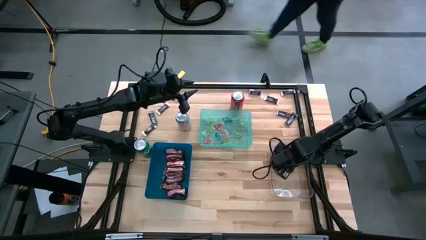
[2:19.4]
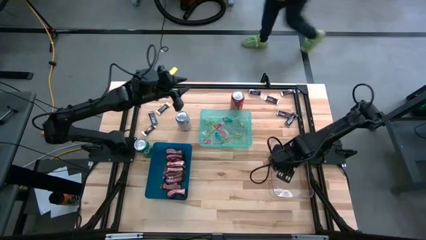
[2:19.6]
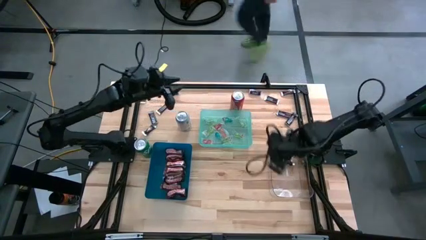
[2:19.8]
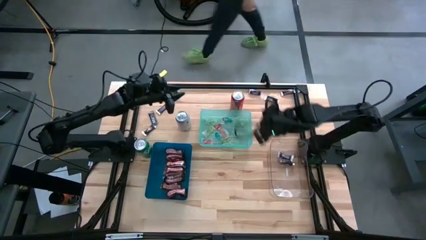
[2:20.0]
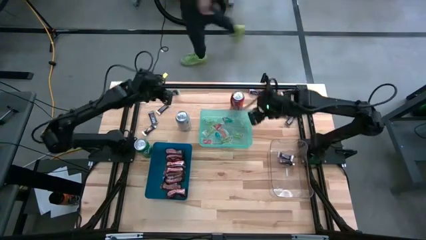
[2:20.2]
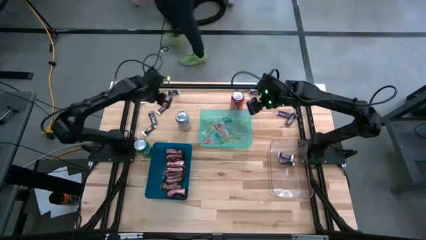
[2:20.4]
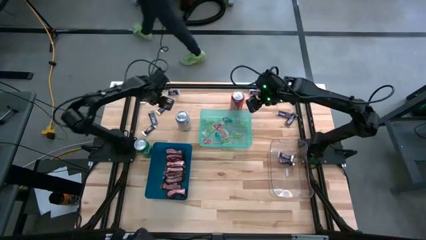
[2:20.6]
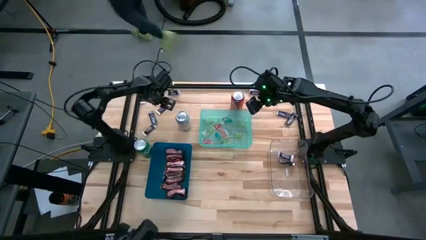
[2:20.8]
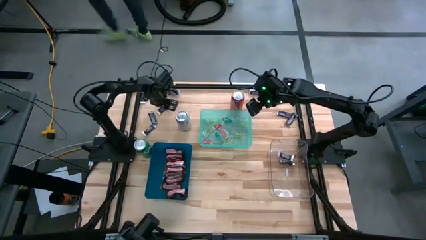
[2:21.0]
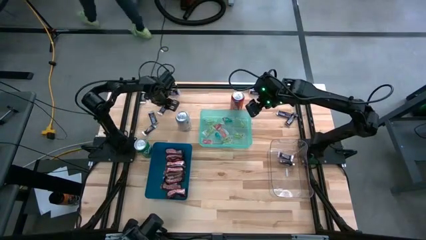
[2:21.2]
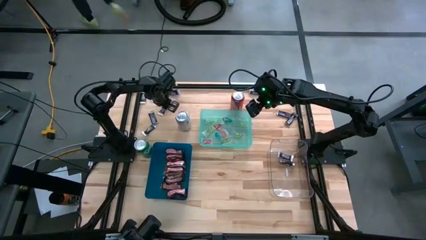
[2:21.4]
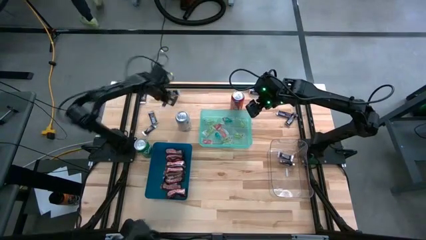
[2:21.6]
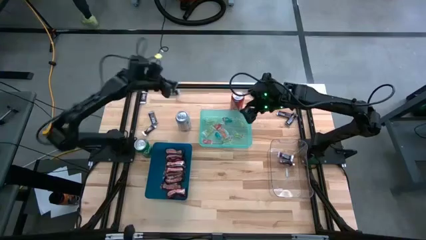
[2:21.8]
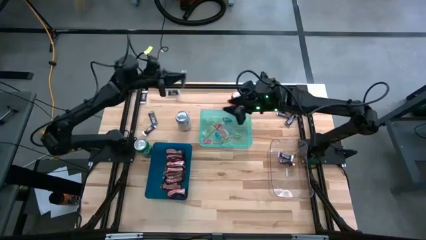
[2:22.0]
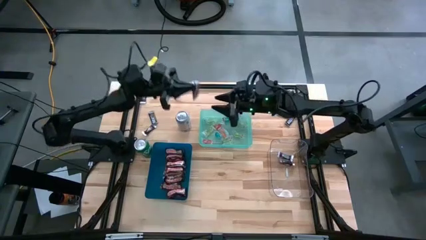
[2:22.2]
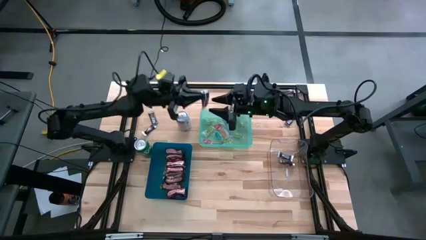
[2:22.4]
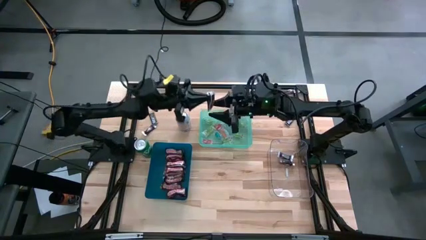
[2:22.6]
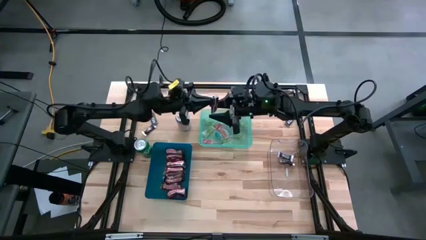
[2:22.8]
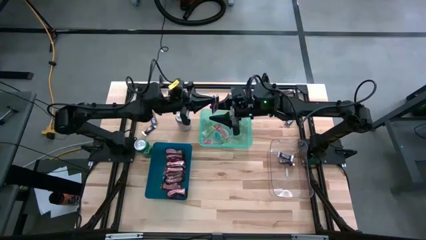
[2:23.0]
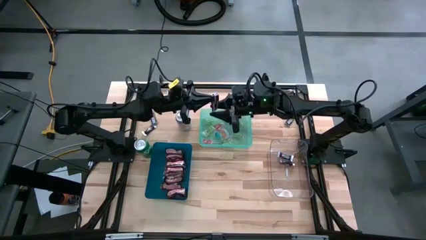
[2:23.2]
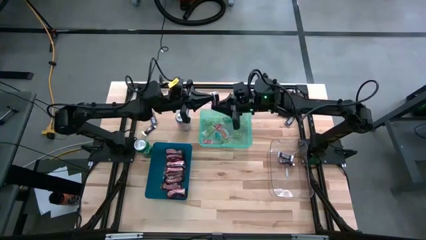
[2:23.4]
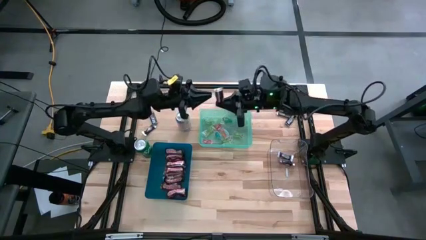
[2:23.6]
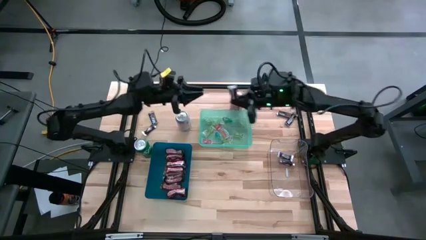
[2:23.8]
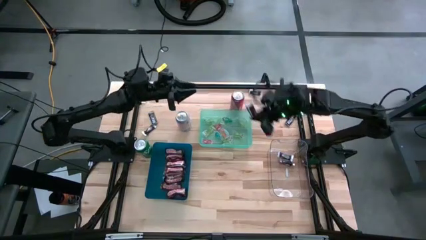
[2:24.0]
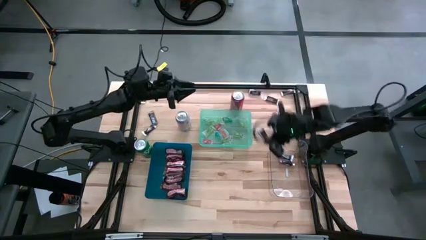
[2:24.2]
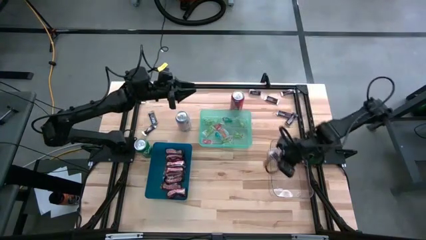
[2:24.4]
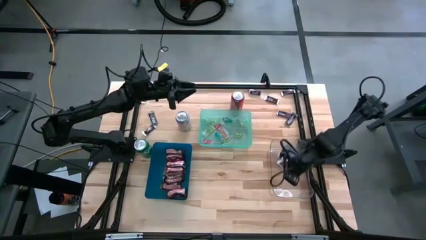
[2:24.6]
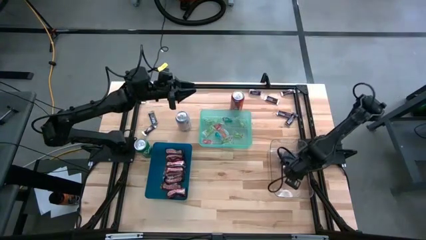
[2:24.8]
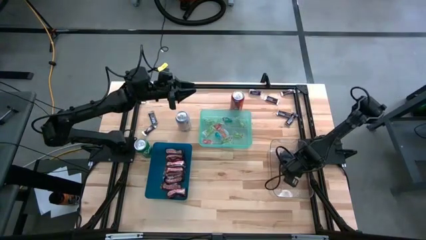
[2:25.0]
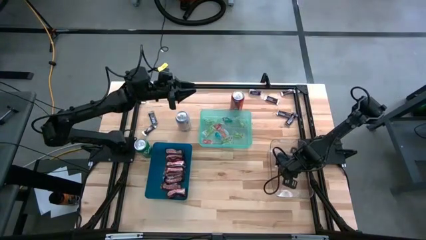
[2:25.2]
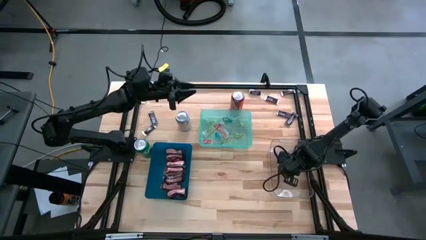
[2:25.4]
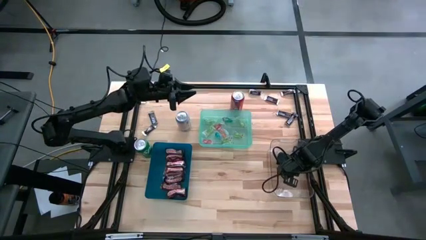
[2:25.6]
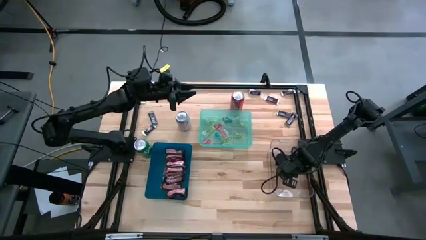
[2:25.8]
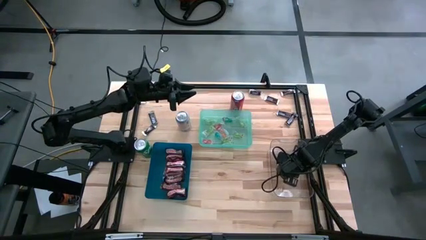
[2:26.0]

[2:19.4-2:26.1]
Task: Organize candy in baskets
Put the white brown chocolate into the transparent bin

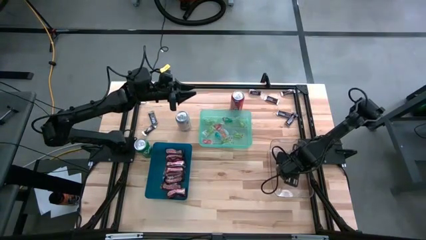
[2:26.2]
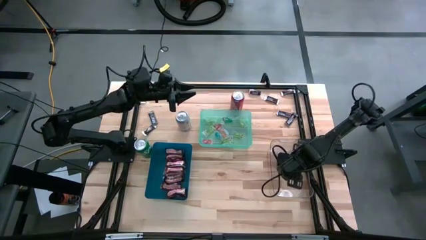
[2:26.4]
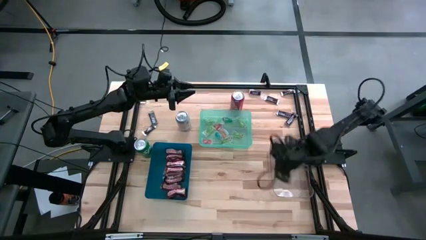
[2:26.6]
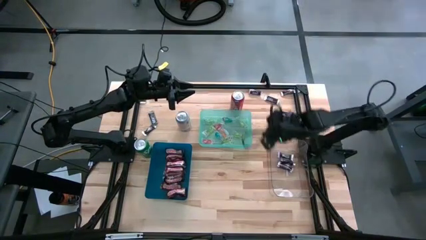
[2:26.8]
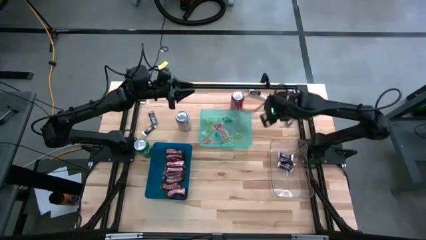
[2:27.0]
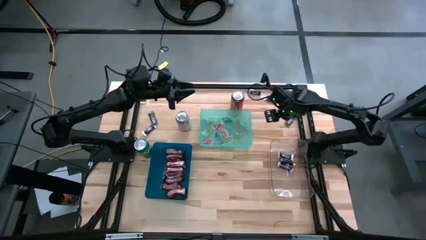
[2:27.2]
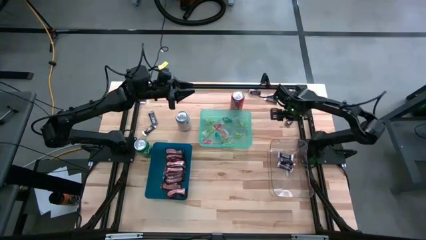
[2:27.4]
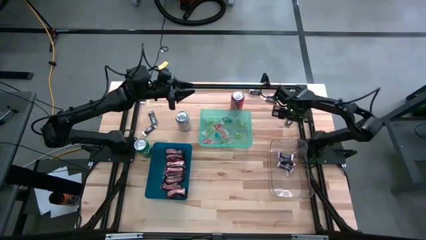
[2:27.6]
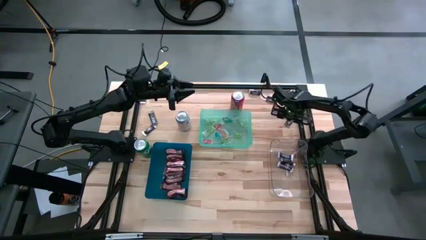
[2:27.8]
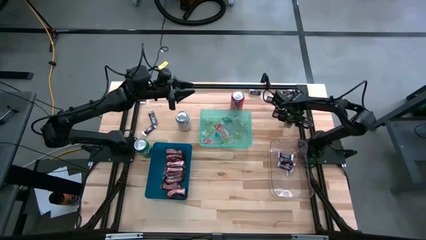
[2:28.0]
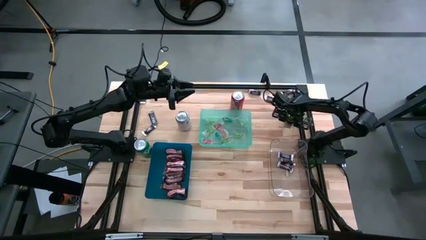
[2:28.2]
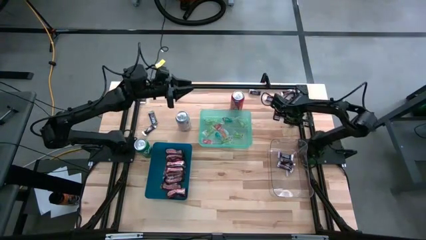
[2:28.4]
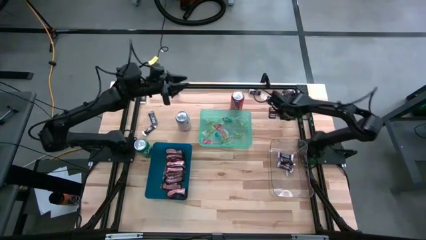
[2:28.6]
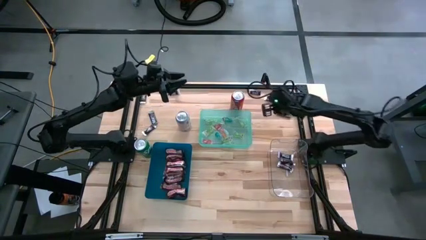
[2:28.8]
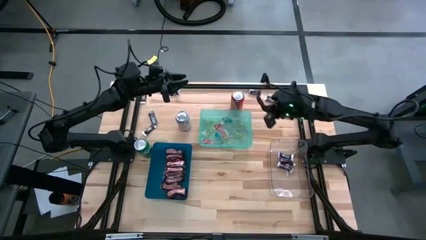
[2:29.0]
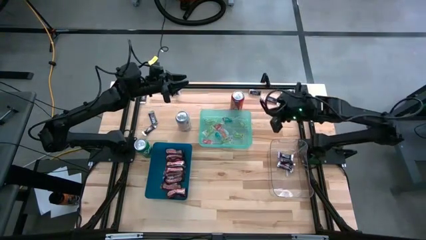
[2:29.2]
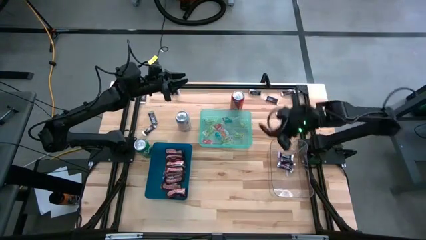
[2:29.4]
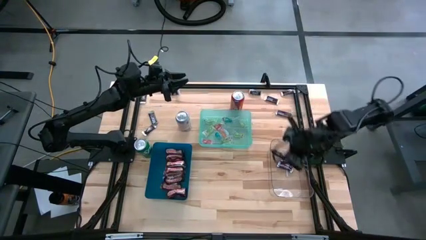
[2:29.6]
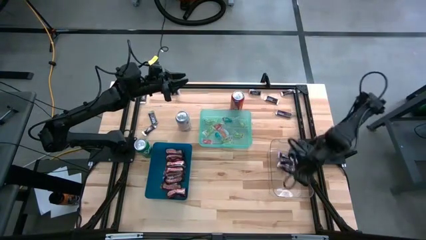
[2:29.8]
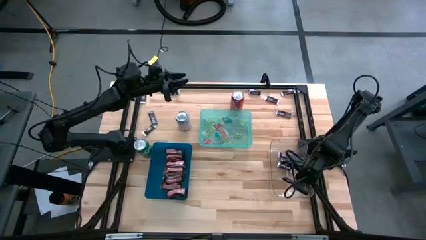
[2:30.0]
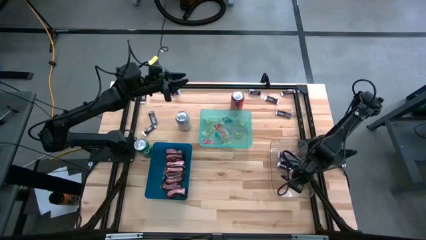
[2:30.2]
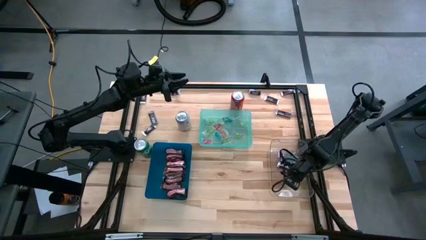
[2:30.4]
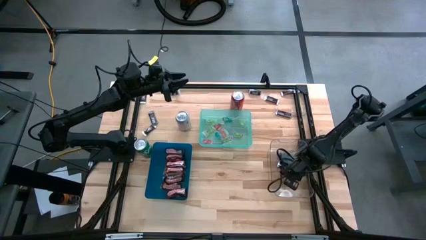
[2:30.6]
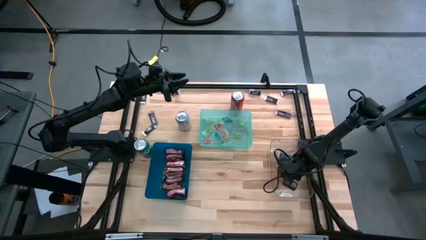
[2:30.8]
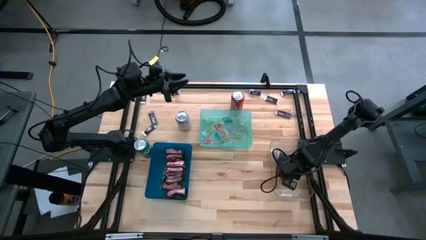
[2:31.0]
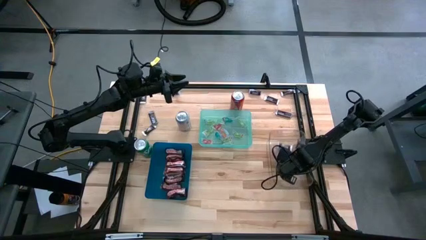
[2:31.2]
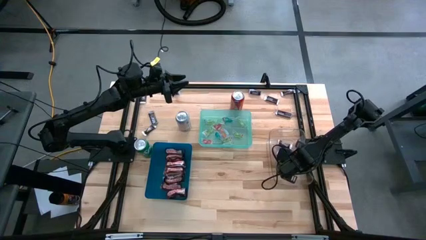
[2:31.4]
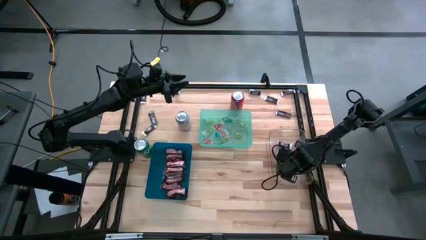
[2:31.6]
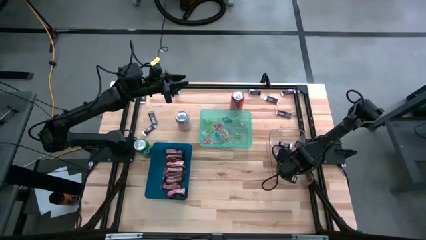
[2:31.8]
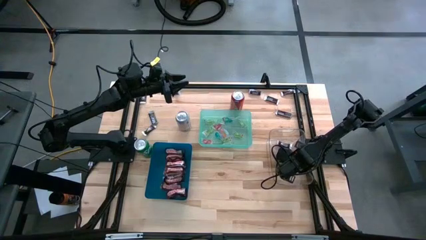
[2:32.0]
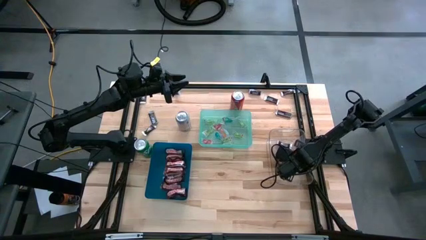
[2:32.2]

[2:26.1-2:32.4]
Put the white brown chocolate into the transparent bin
